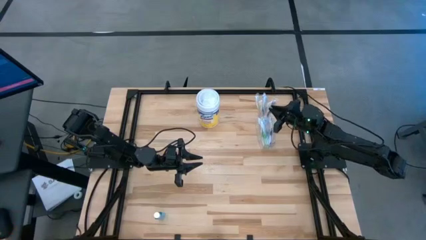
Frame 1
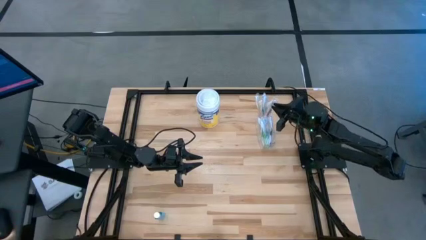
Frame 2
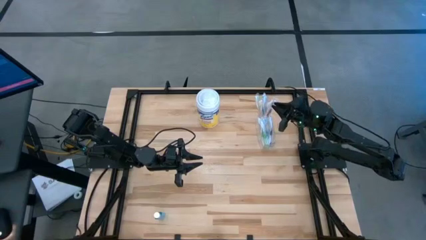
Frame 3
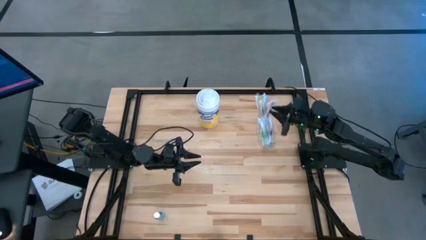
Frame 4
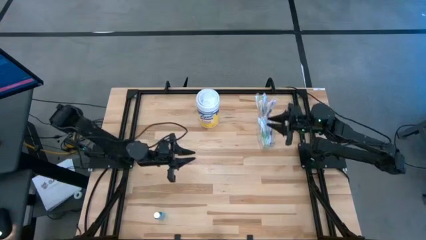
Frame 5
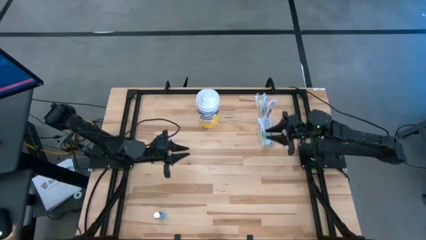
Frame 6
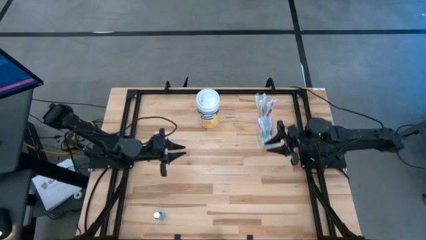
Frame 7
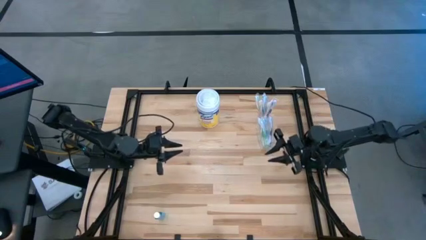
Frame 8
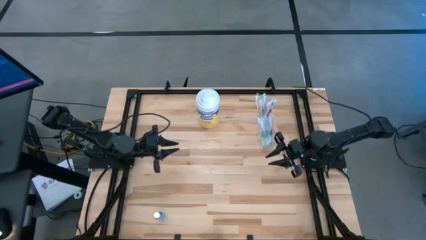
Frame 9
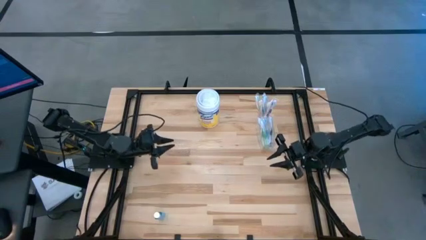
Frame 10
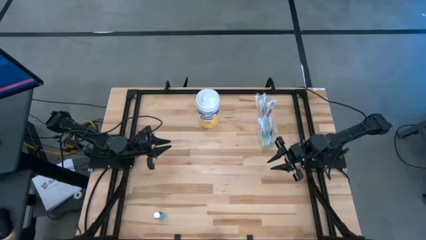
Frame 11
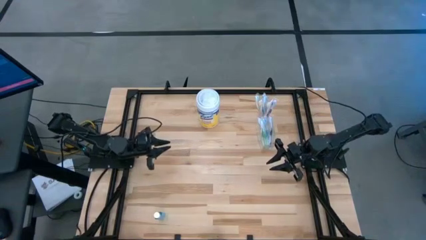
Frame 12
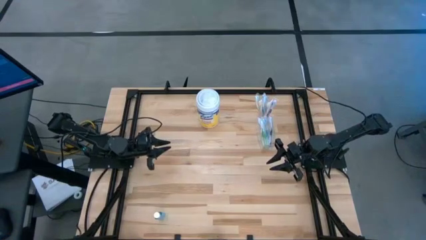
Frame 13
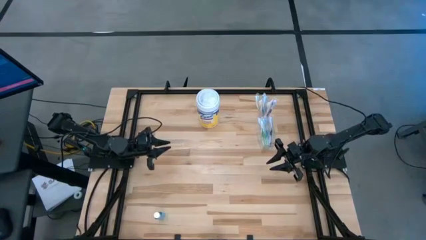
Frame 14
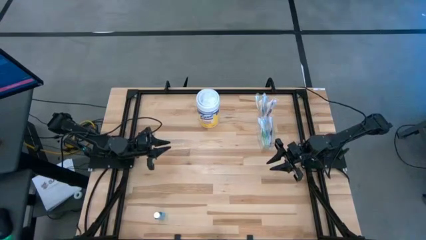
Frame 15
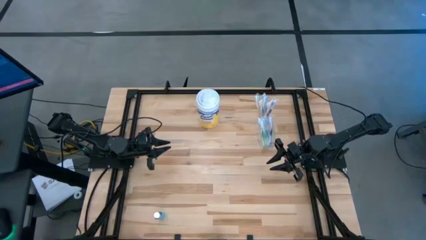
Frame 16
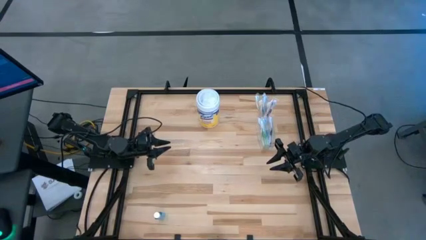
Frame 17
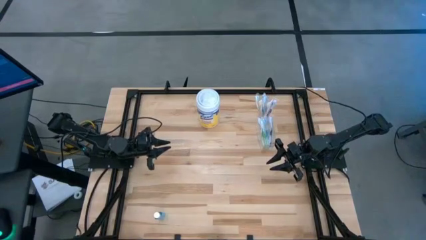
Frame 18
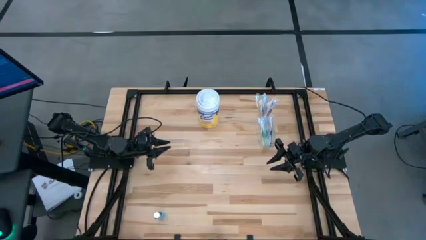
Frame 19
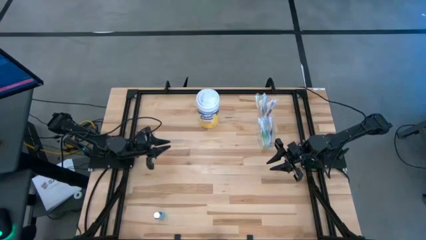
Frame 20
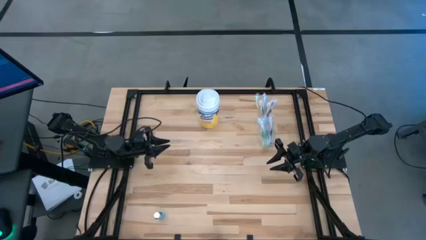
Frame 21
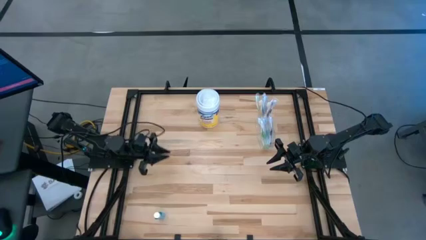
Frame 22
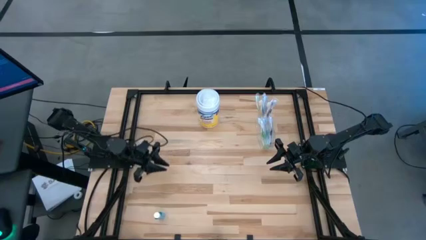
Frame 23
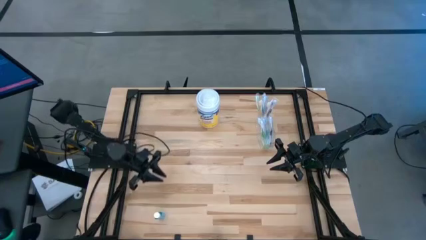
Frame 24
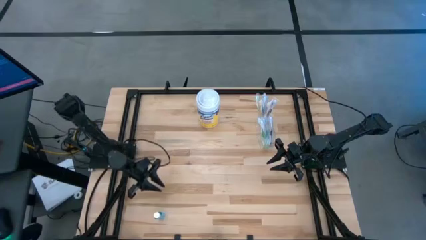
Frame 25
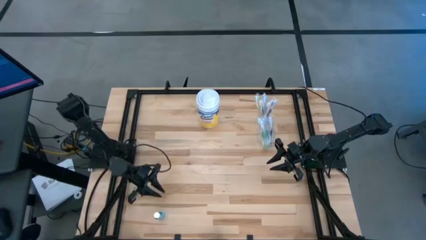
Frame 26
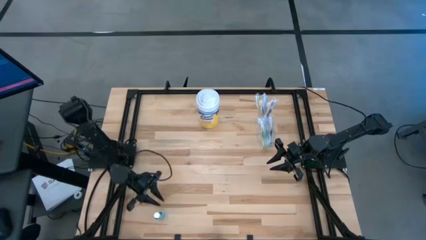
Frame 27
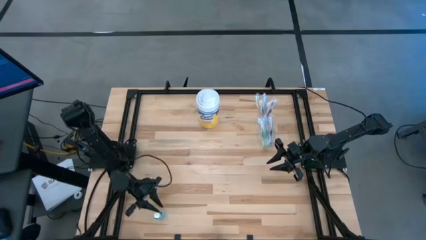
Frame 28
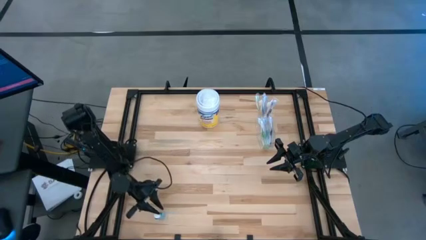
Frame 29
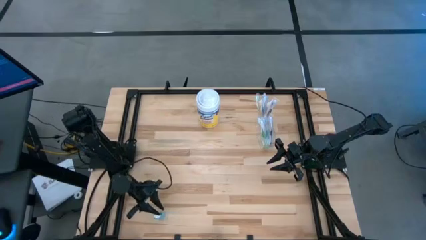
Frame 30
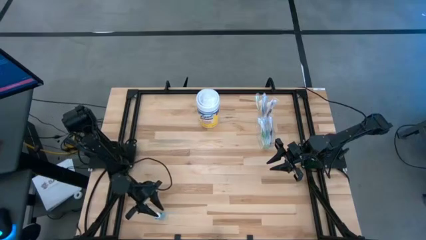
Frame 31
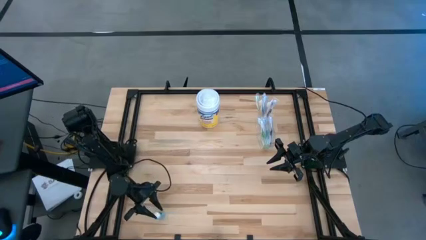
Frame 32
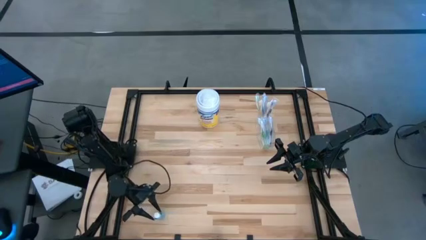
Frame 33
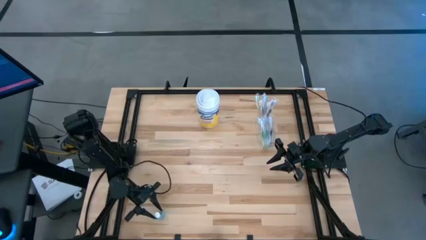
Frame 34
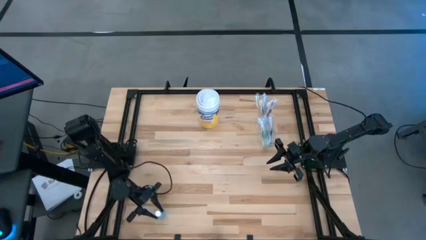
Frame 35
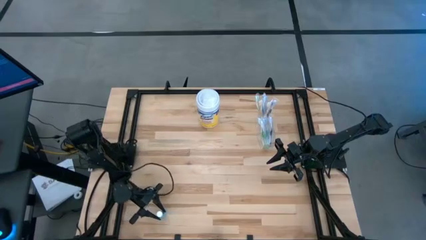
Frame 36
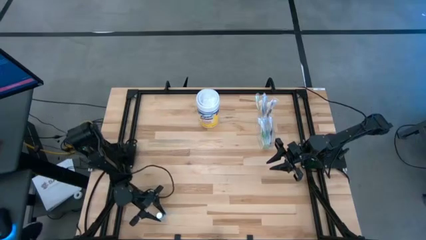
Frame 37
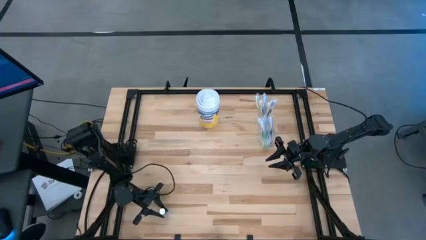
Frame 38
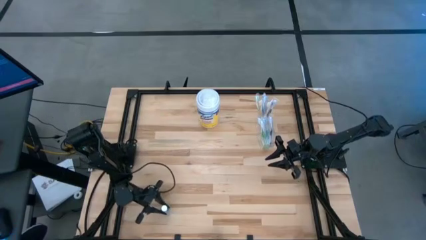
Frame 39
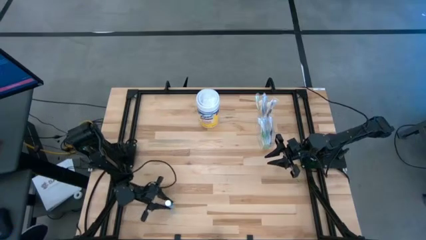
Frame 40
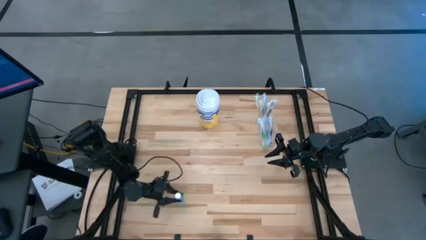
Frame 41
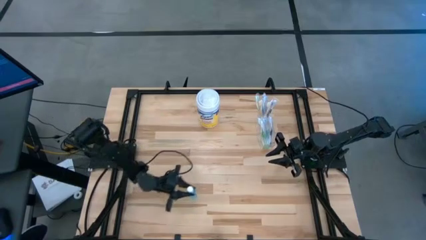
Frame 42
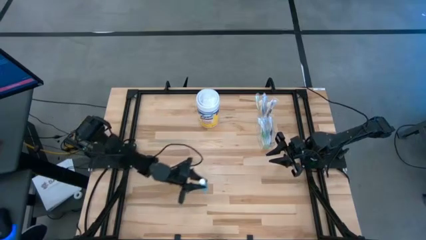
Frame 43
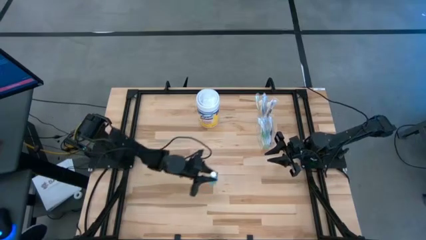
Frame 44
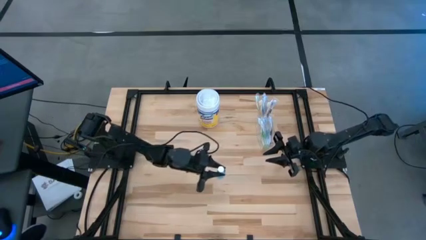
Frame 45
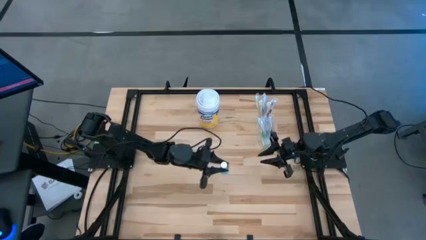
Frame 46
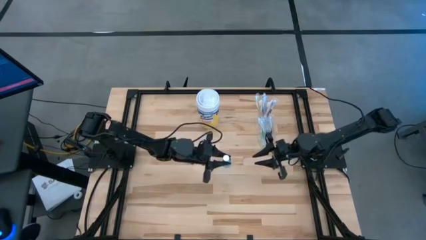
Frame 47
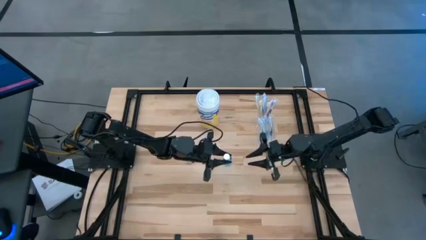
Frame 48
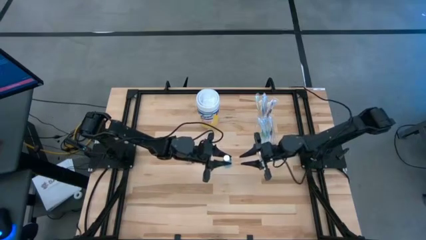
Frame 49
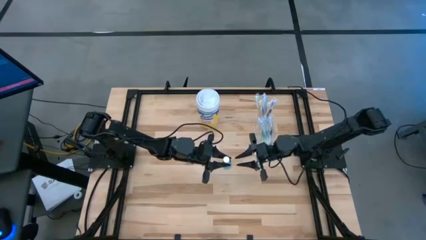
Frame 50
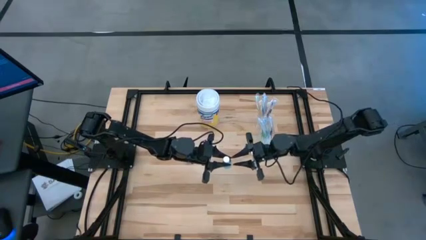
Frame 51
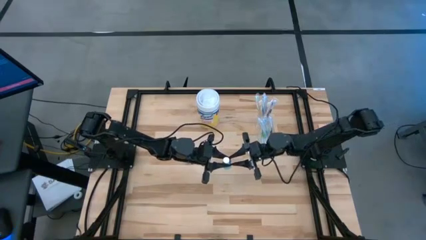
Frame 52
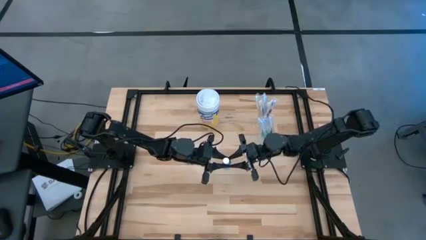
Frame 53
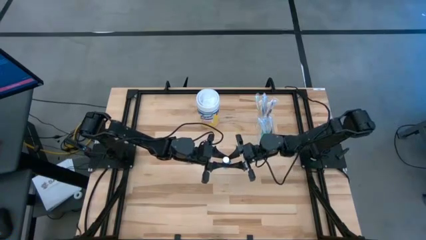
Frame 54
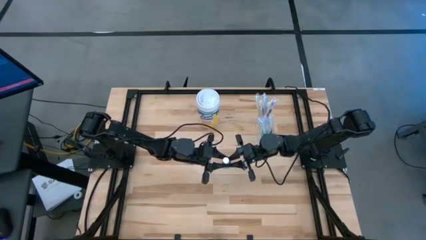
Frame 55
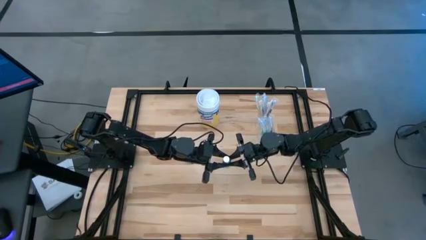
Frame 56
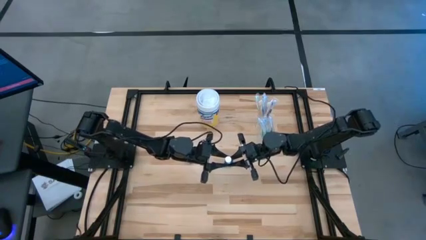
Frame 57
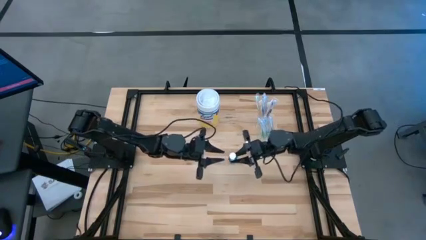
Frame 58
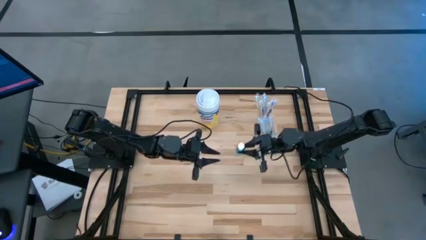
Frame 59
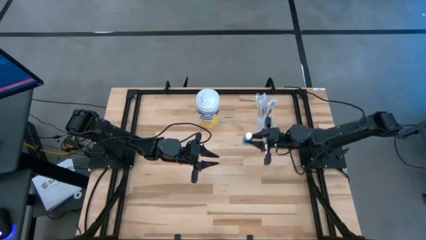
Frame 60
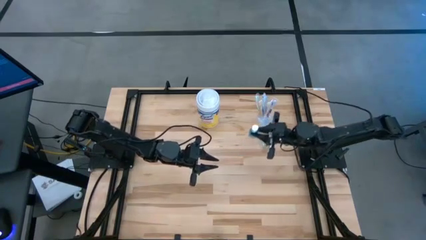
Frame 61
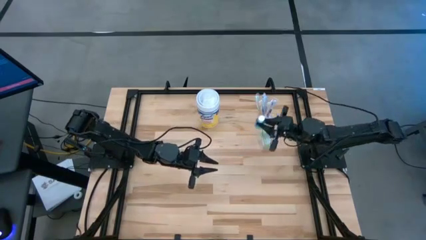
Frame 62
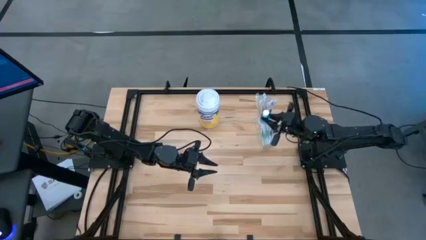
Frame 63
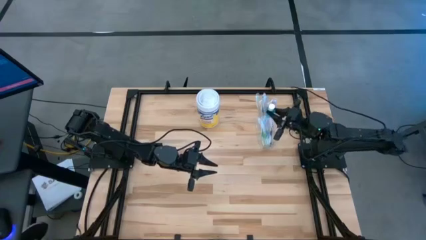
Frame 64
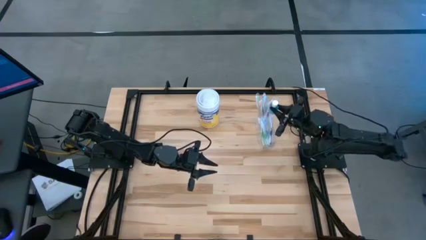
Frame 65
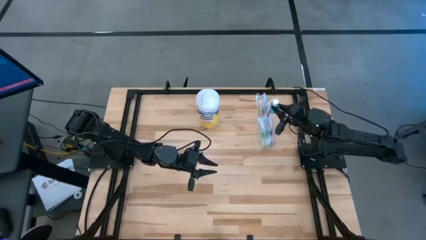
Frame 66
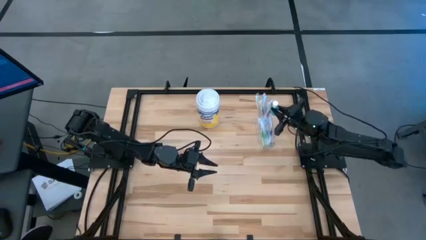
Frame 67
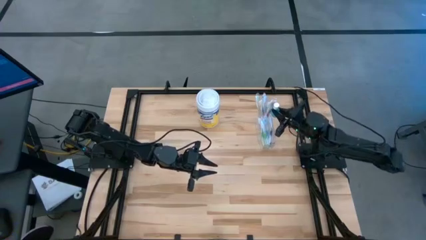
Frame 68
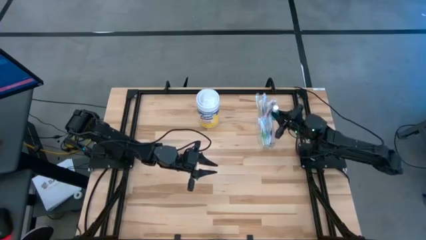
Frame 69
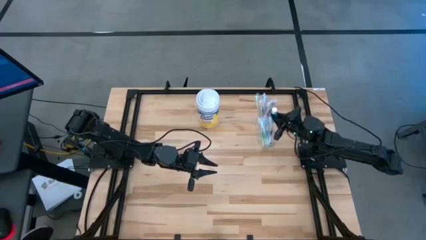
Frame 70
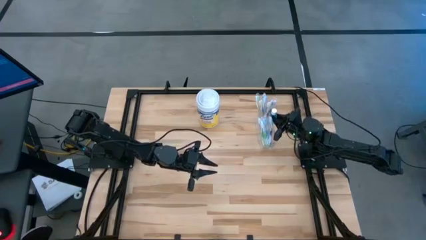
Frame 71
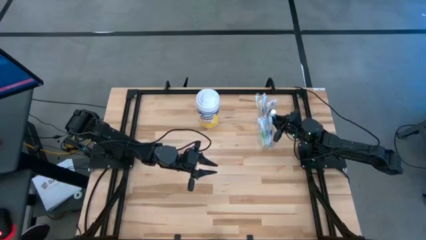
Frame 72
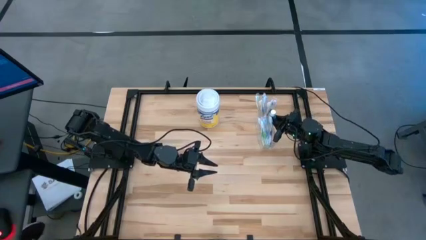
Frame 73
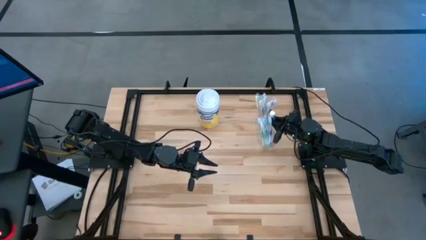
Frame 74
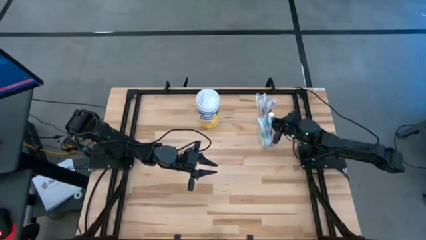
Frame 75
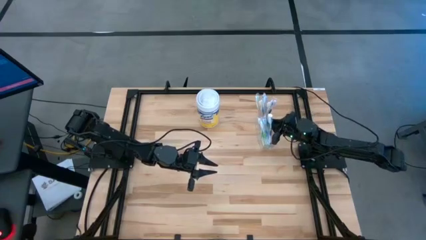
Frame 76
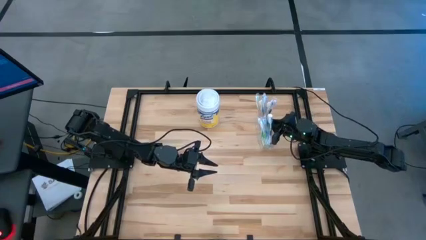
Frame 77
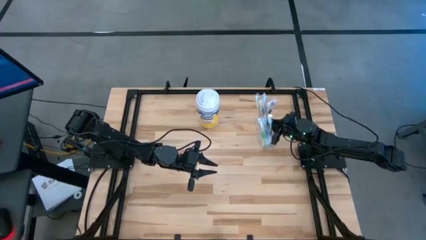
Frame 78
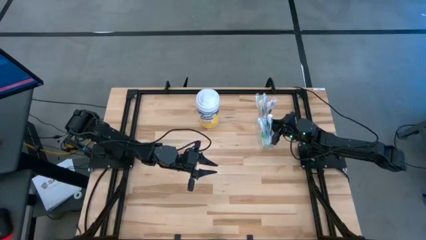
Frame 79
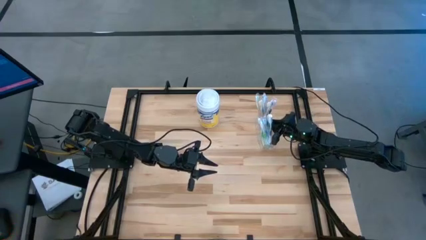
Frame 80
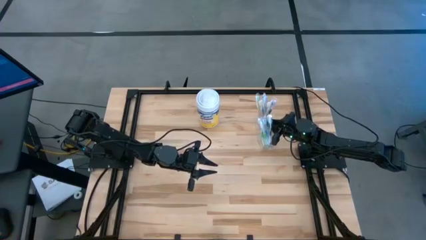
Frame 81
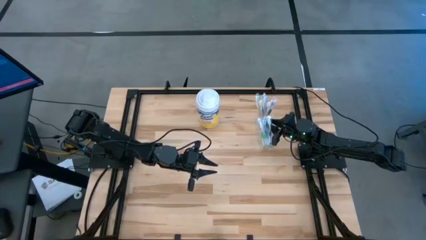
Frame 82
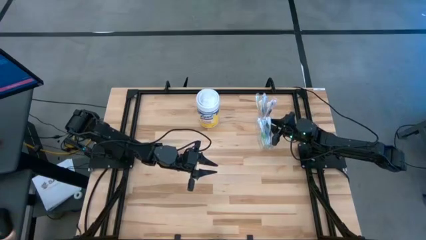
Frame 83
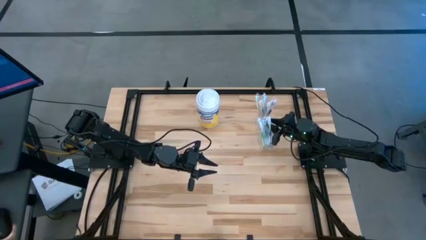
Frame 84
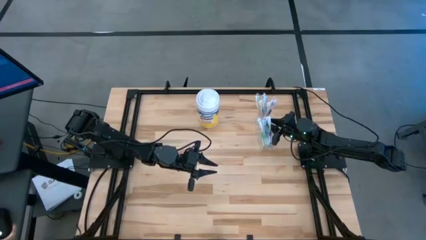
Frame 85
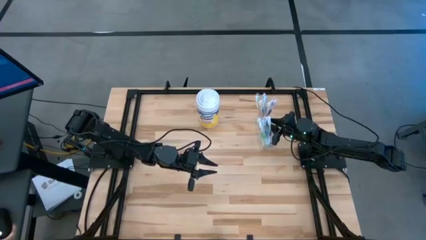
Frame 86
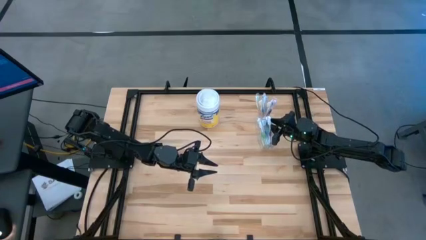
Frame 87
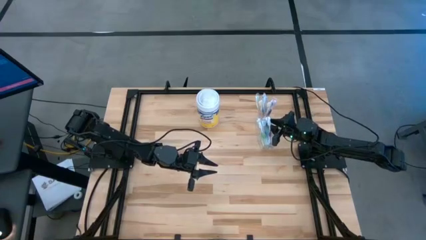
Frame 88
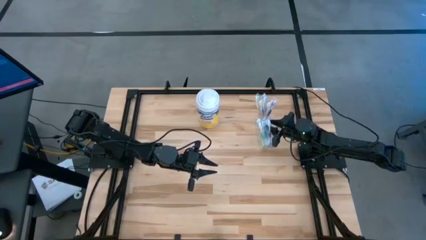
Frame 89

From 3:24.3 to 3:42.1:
Task: Pick & Place toothbrushing station
Put the mouthwash into the transparent organizer
